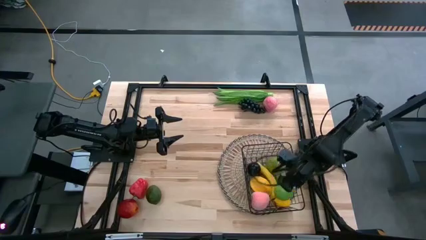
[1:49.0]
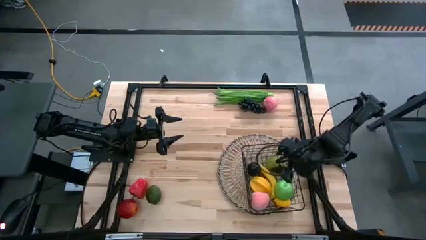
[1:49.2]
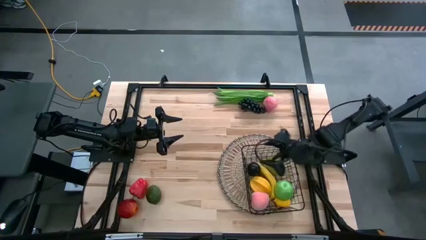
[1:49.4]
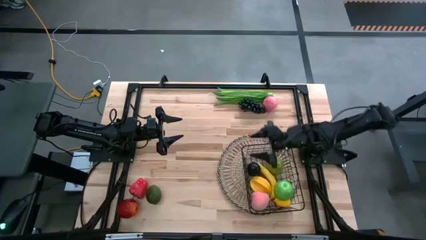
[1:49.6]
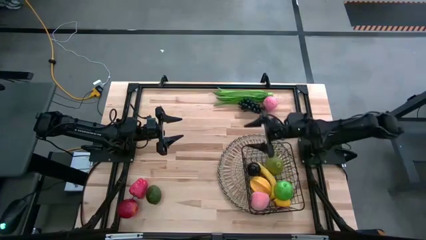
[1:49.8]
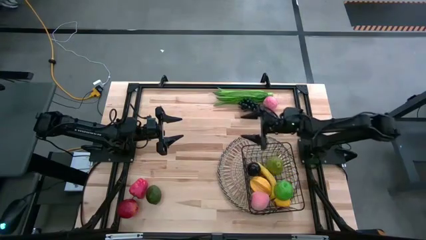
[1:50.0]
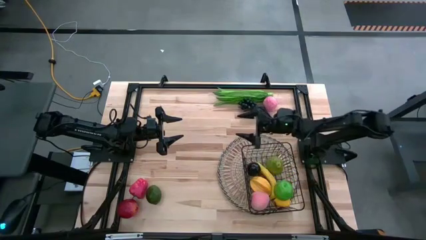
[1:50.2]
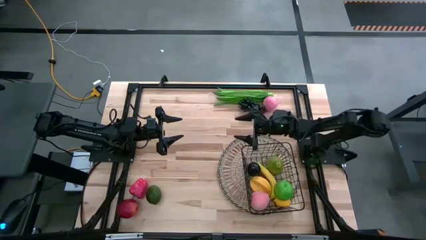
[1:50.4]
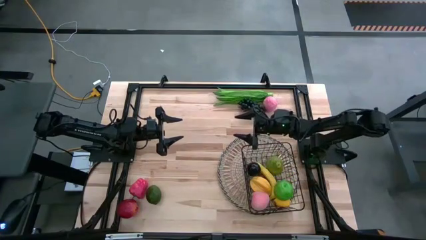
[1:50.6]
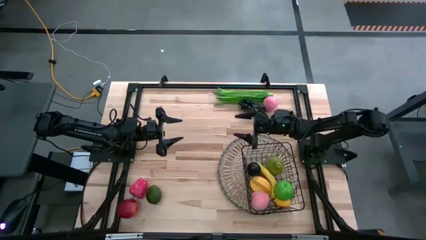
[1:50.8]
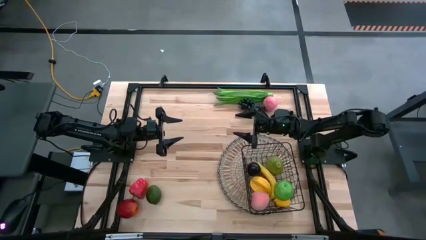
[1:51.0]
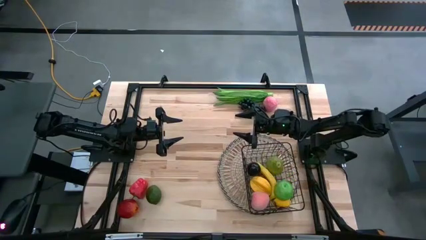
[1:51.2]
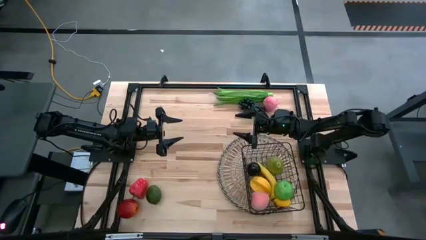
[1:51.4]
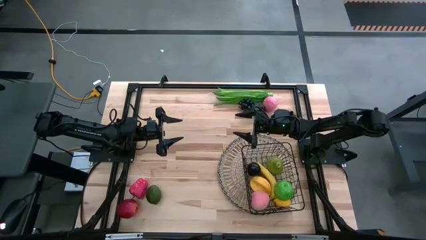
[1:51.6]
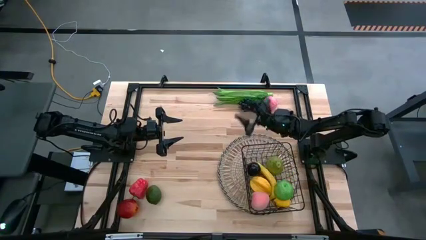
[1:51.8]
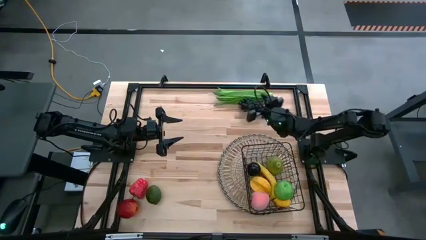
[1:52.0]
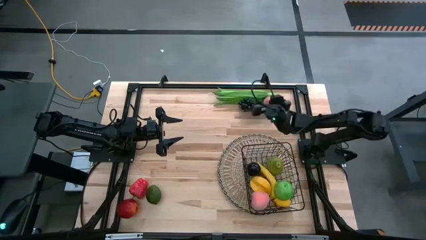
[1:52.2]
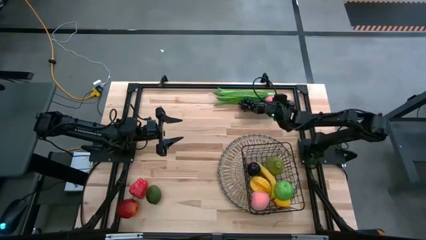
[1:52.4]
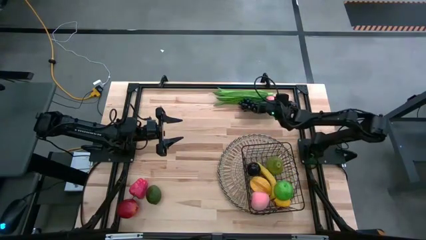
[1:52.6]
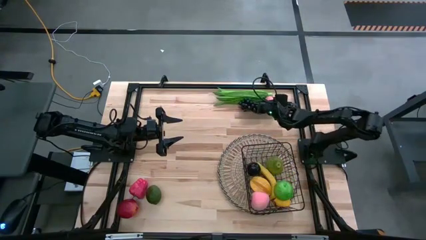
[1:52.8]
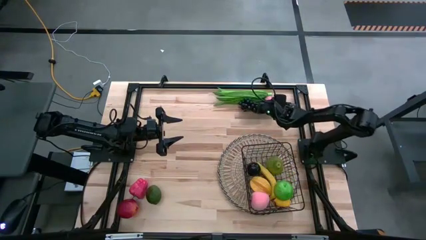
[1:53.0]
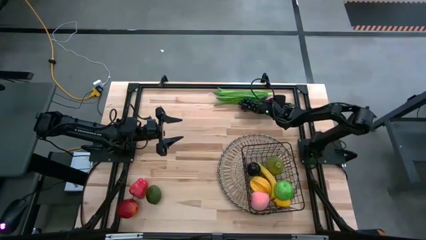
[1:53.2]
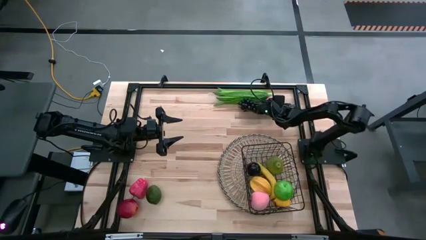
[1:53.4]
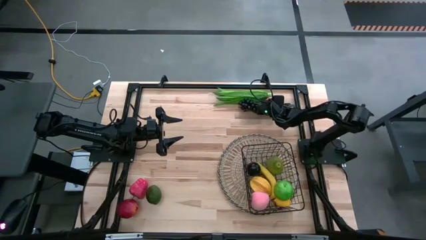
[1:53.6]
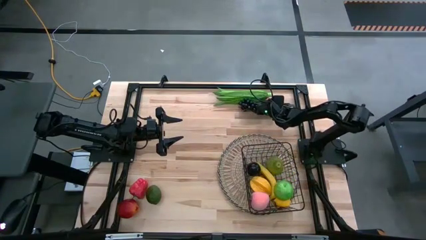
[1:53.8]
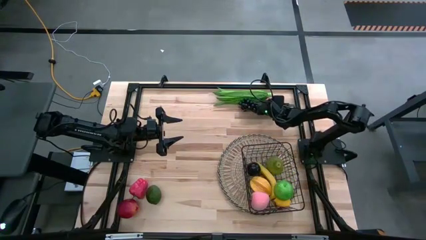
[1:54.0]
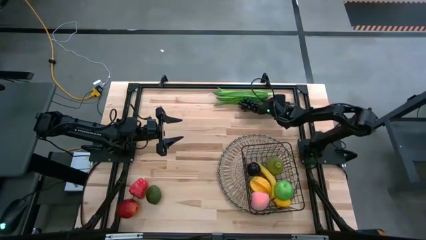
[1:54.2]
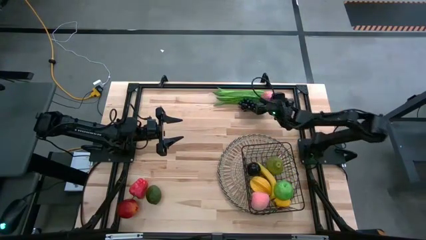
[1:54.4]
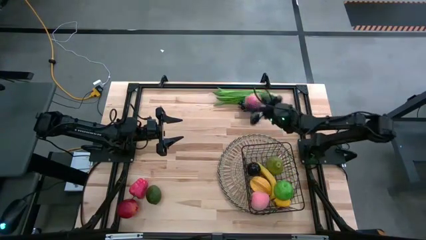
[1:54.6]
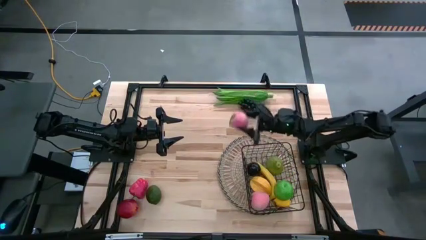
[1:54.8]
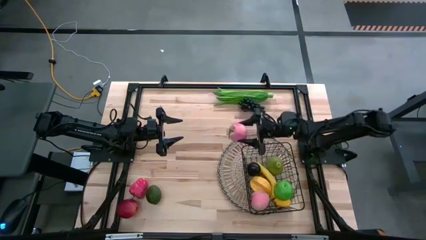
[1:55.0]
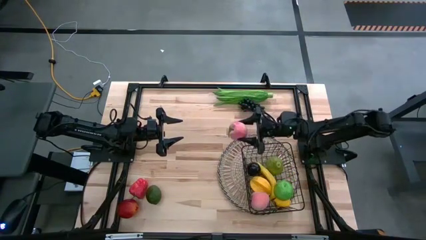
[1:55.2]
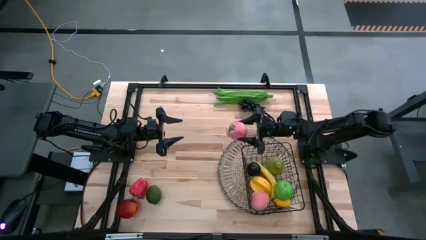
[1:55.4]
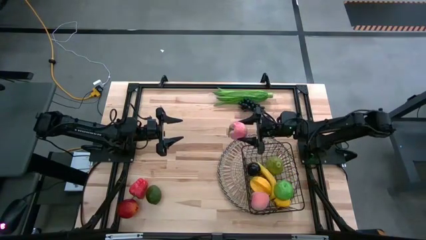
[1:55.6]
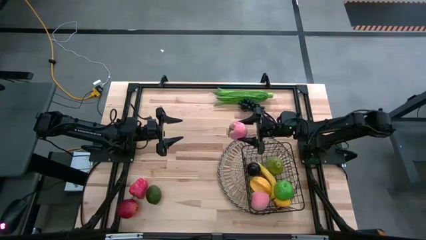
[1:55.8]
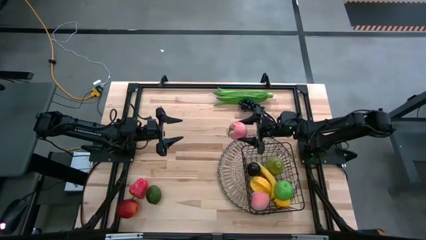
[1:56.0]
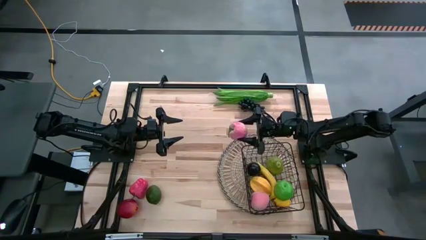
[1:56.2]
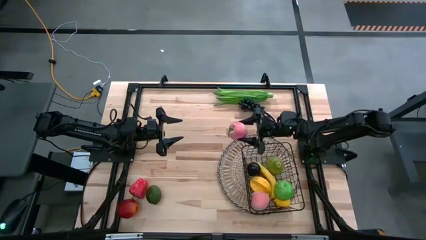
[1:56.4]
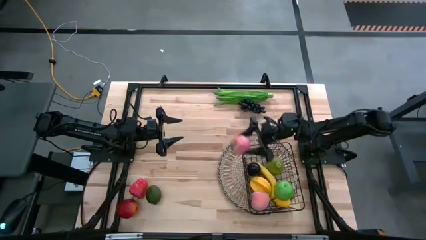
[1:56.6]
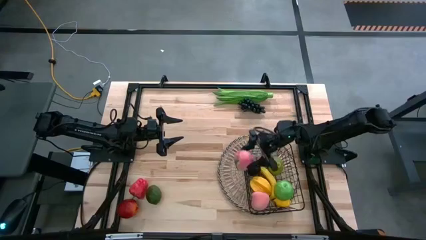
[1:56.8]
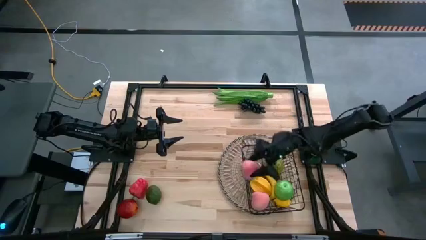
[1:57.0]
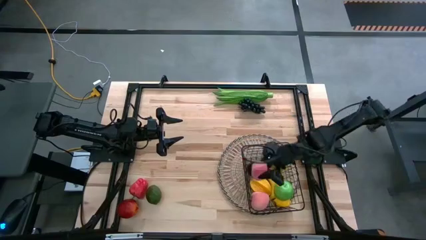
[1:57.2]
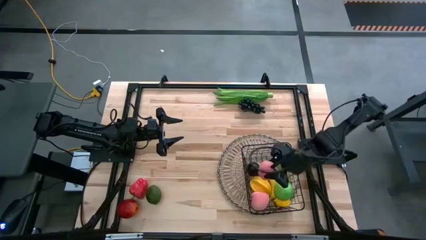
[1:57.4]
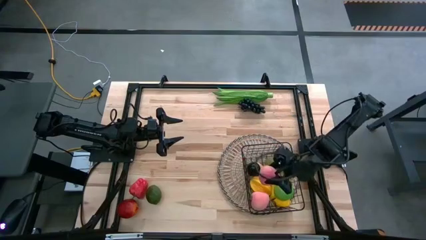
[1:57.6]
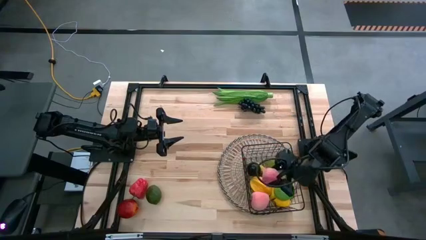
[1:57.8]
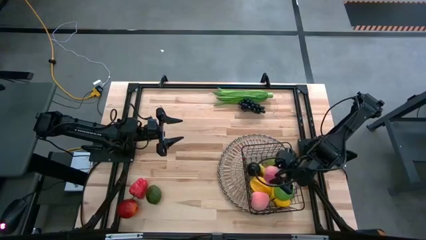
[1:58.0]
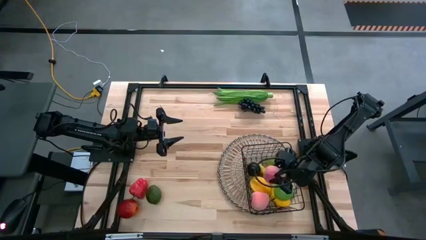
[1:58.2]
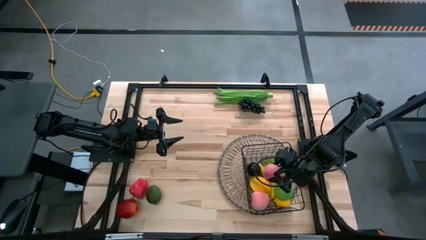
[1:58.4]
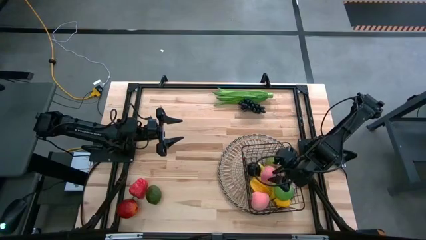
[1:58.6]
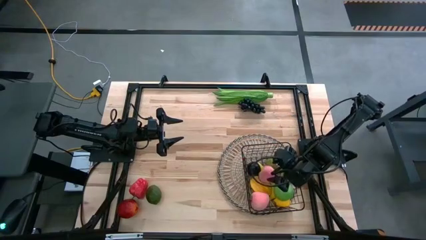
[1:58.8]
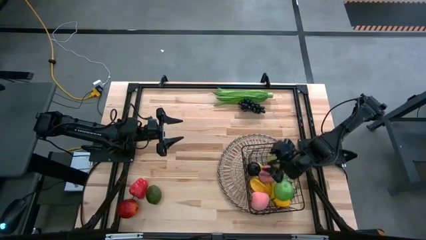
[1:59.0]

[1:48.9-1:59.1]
Task: Build produce basket
Put the peach into the wire basket
